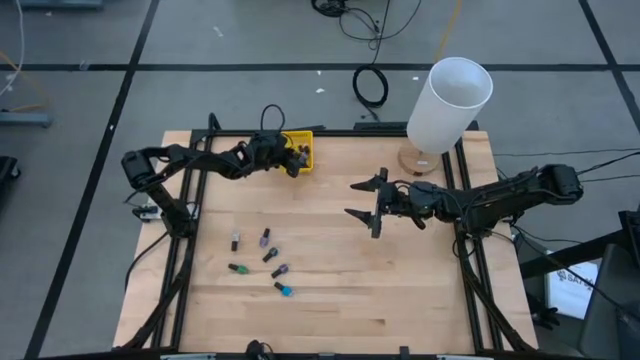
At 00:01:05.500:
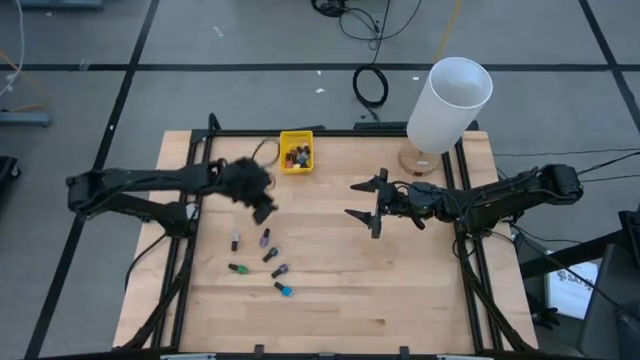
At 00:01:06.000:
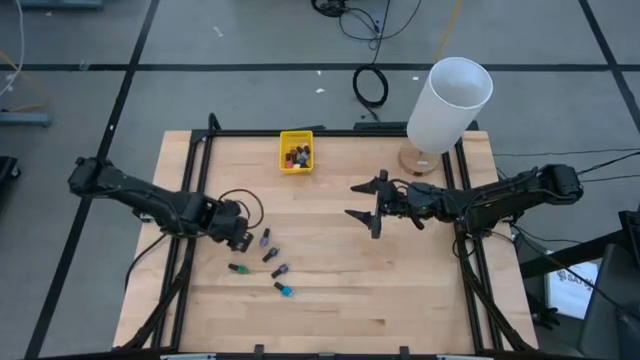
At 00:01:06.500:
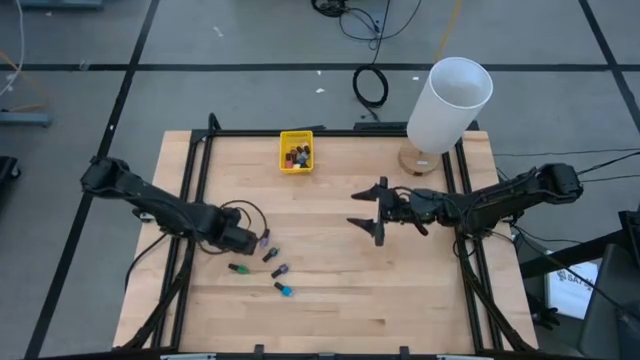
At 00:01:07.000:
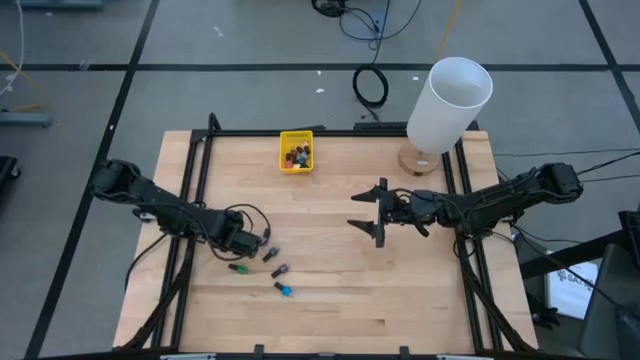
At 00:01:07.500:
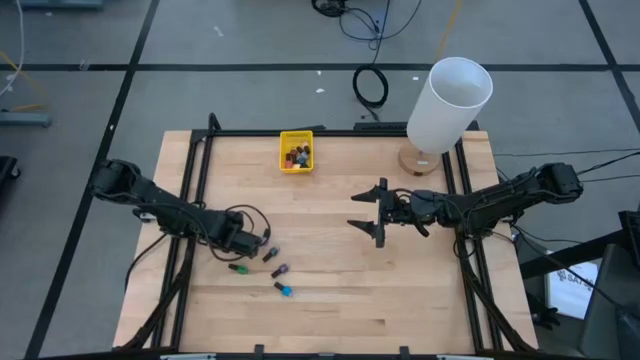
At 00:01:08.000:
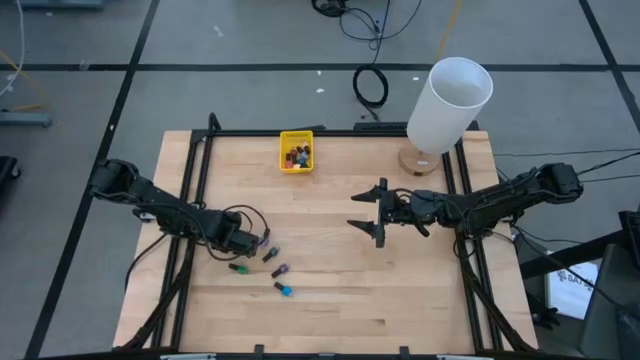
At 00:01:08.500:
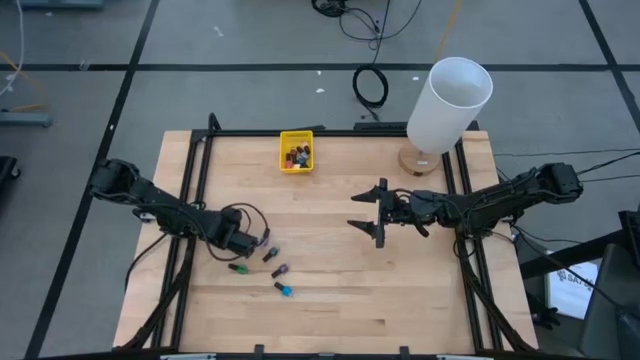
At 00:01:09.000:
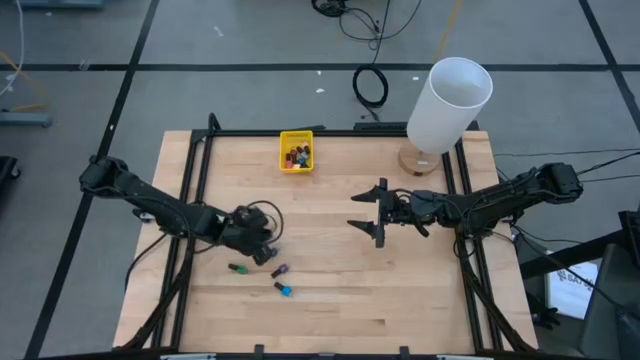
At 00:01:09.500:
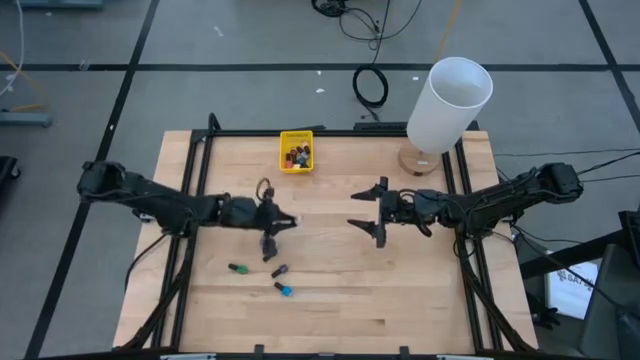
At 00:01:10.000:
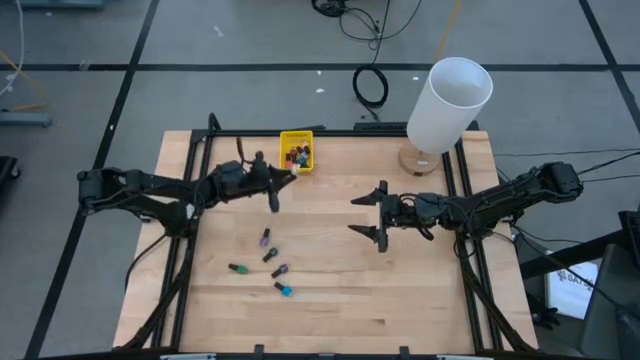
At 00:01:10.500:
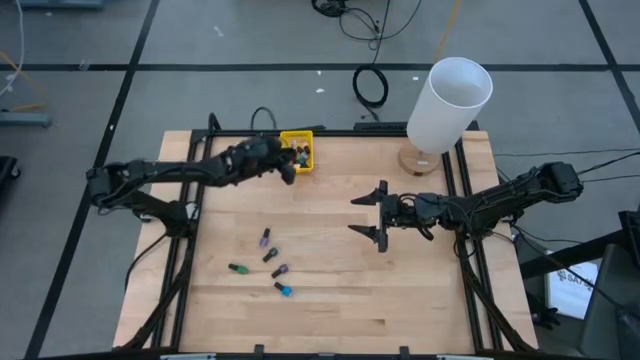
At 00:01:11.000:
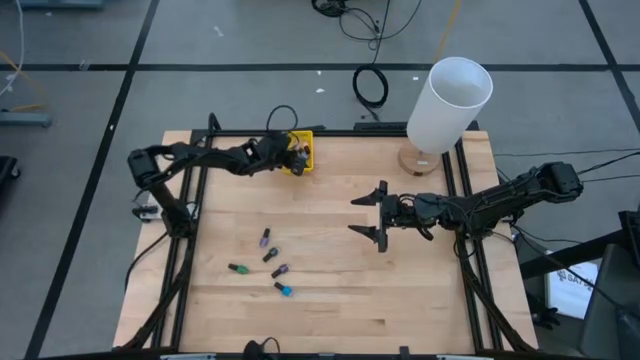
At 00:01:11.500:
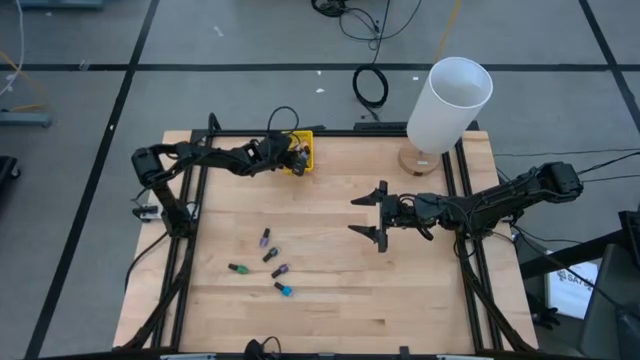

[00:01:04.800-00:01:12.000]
Task: Pick & Place Nail Polish
Put the gray nail polish bottle into the yellow bin

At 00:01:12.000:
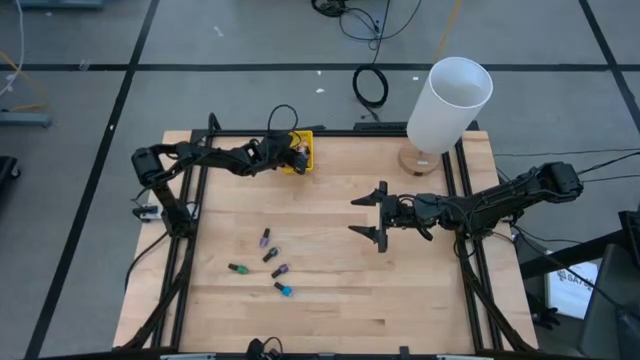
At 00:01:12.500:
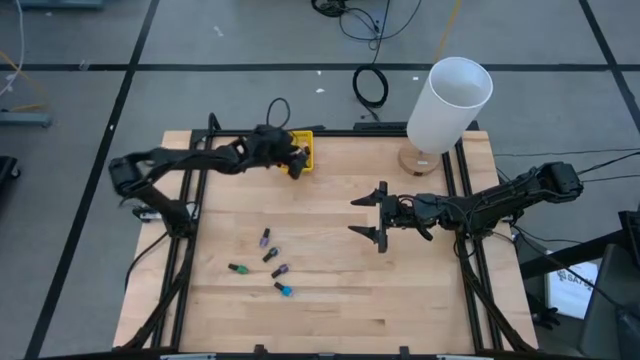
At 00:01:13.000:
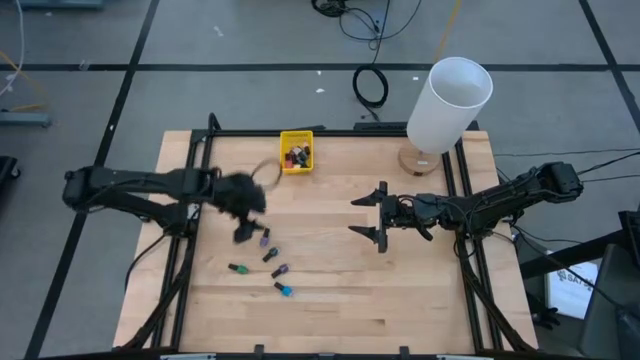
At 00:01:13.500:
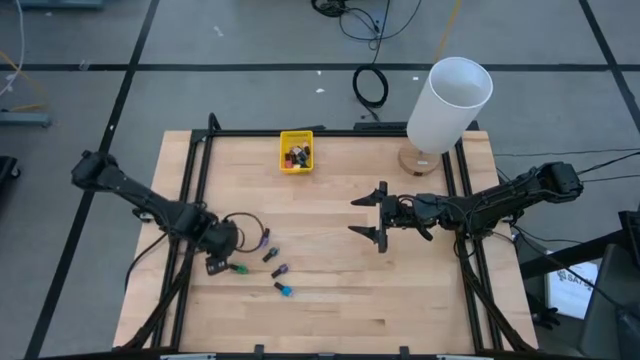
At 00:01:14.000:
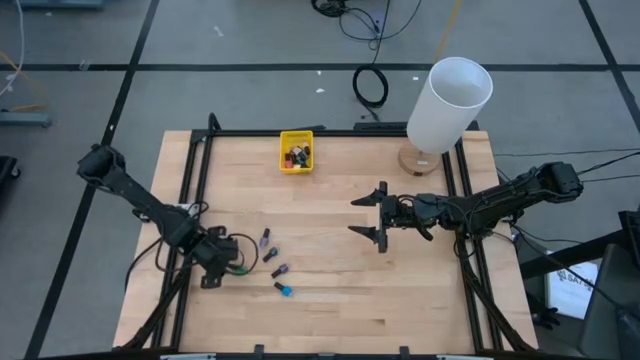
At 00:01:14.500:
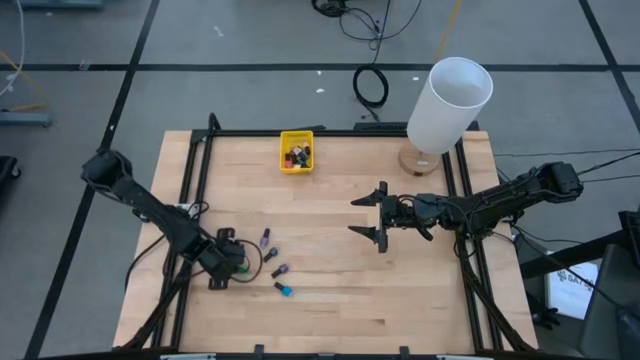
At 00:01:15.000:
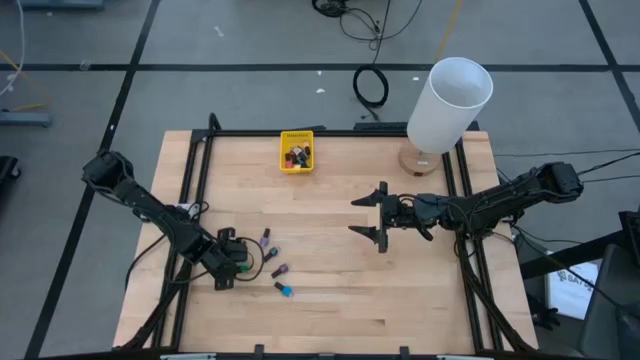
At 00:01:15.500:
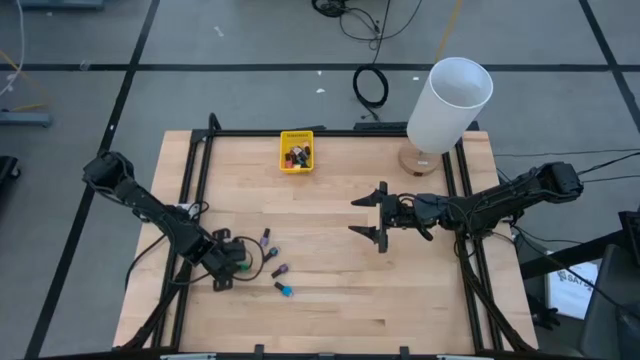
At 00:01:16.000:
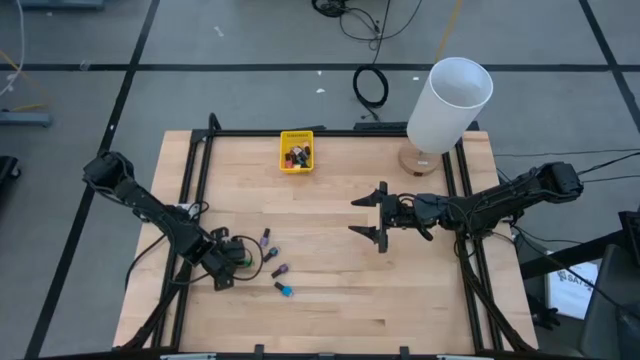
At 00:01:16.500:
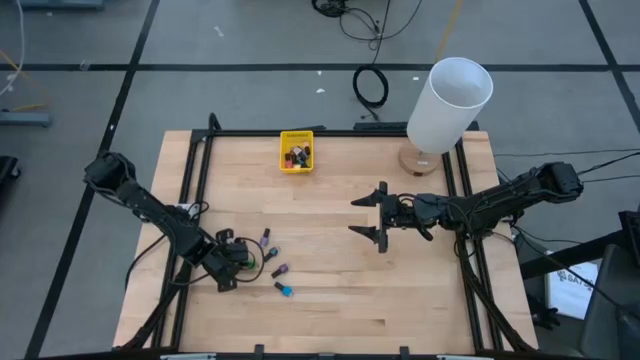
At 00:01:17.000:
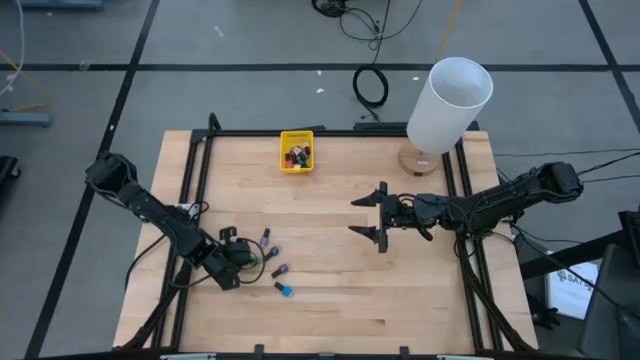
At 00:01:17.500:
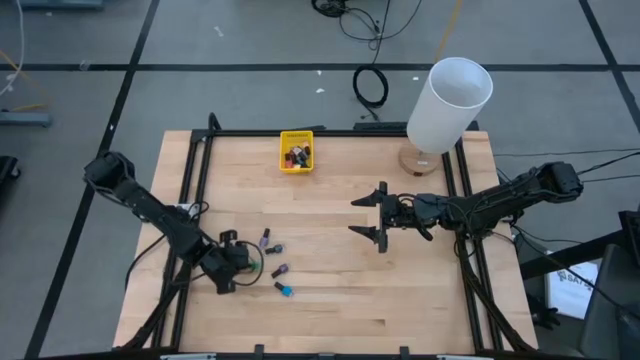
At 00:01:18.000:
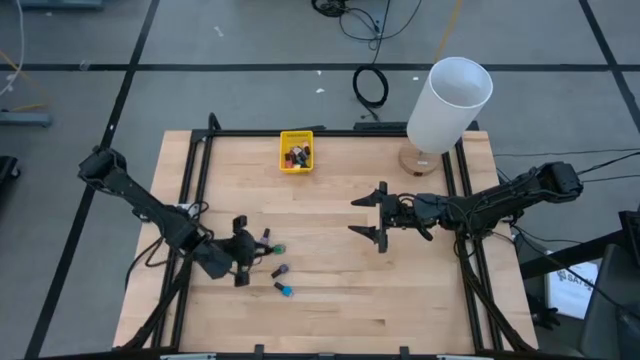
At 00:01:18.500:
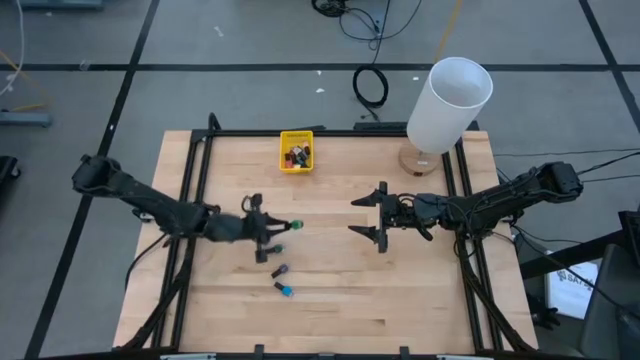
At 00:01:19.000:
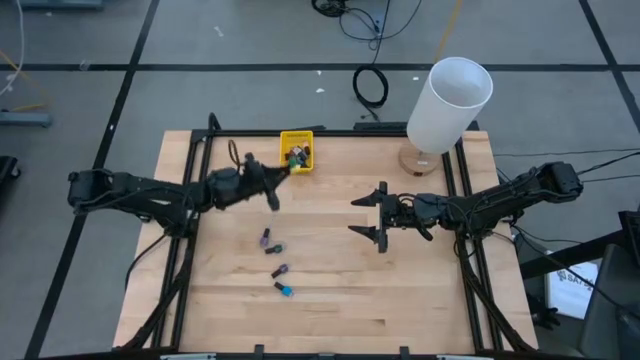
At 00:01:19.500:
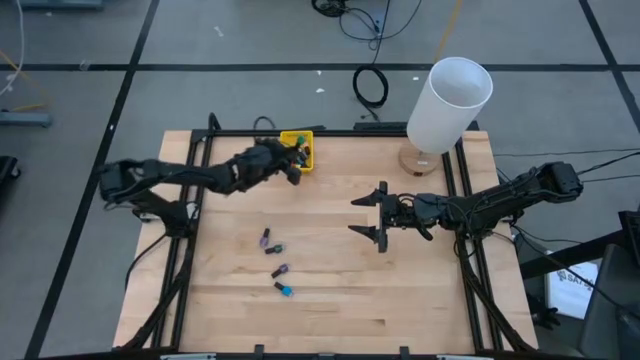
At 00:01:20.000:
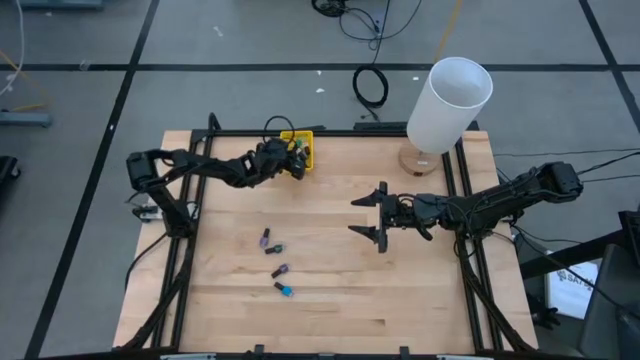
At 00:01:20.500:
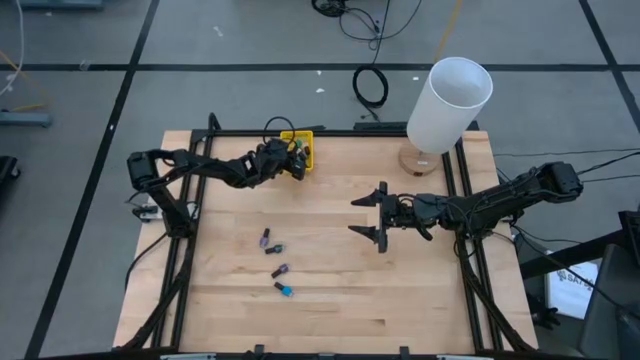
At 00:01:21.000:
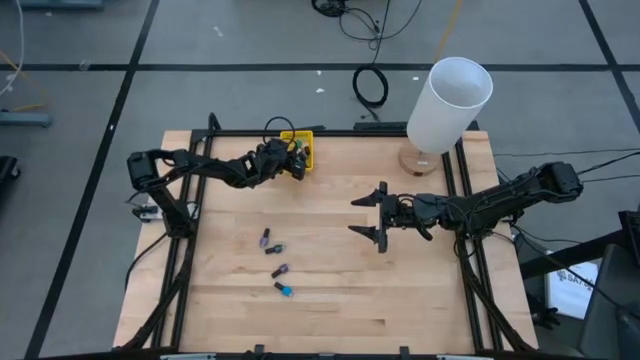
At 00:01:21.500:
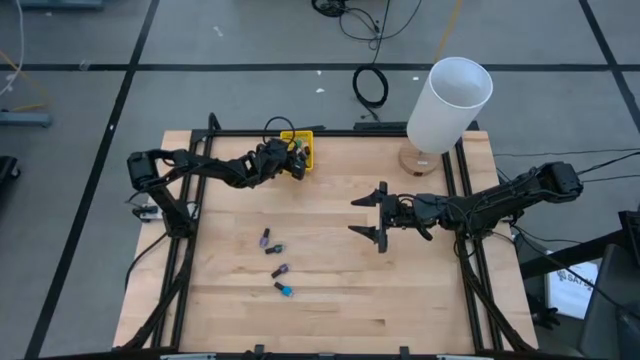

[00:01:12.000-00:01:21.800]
Put the light green nail polish bottle into the yellow bin

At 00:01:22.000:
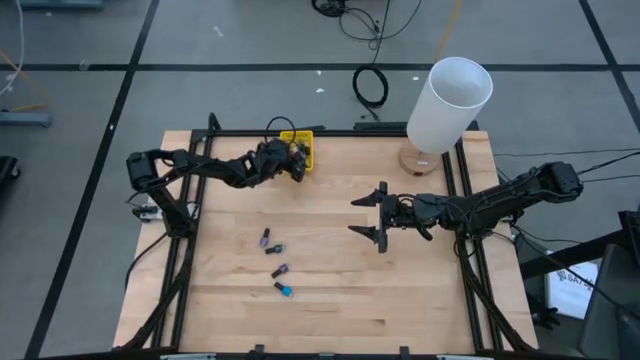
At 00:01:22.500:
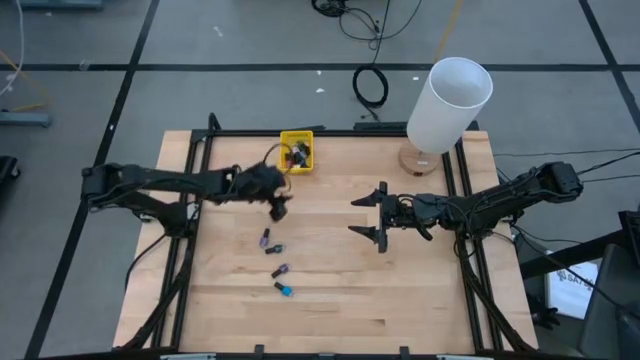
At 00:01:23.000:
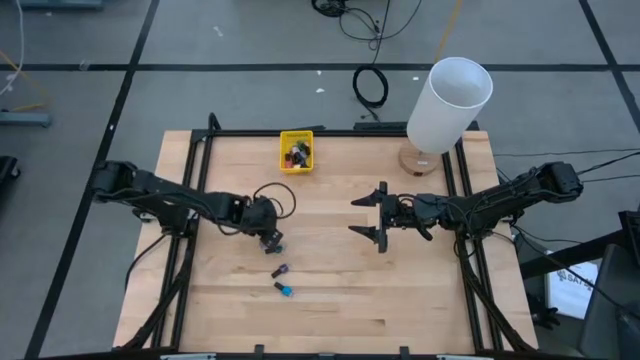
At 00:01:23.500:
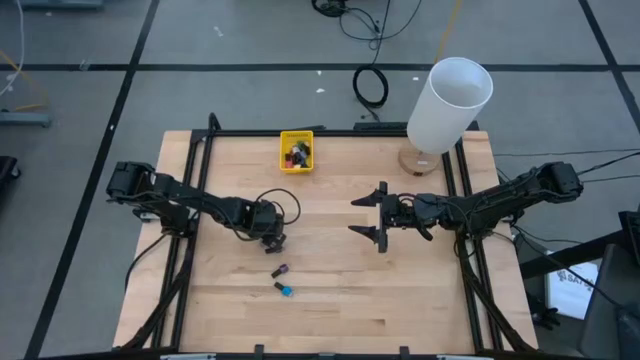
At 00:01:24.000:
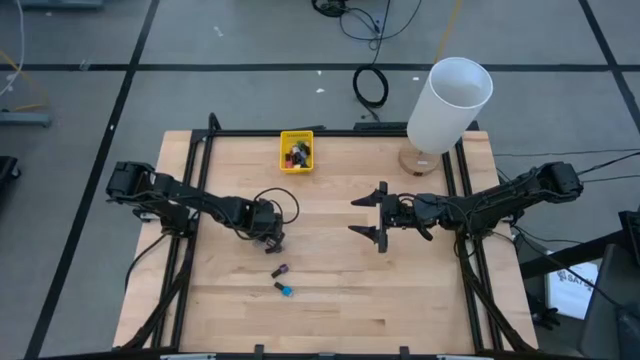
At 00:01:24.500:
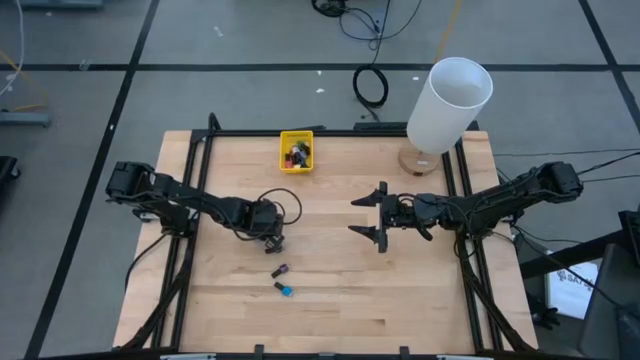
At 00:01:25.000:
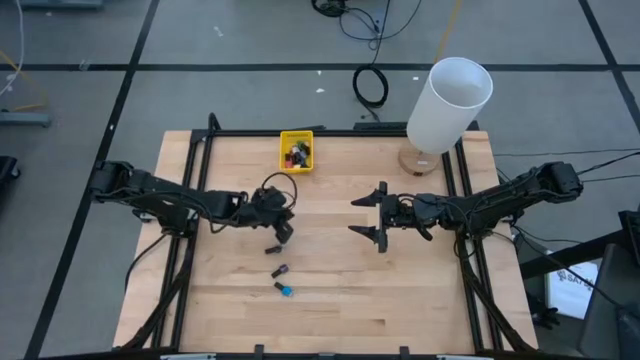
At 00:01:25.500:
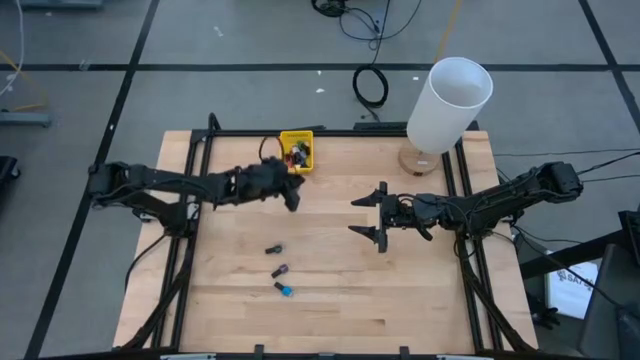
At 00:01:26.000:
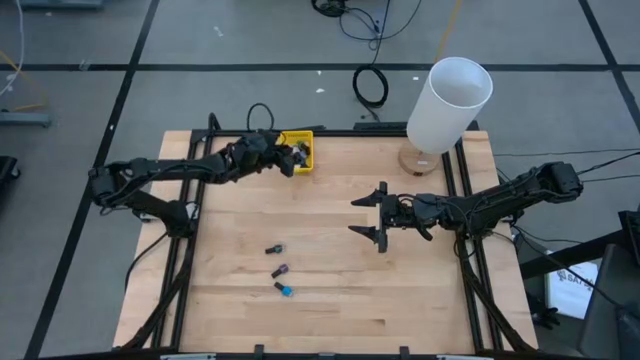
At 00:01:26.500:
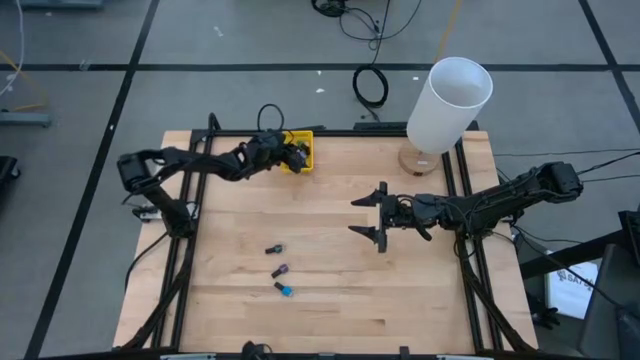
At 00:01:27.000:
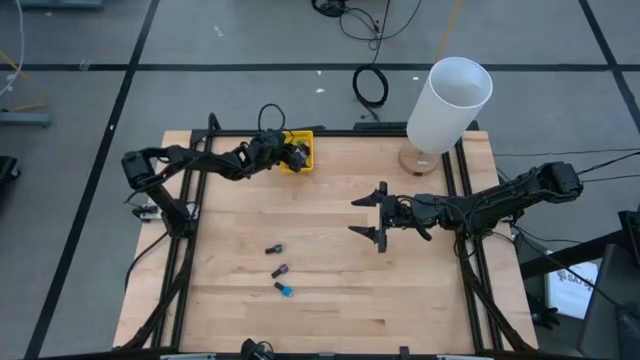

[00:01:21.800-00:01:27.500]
Put the light violet nail polish bottle into the yellow bin
